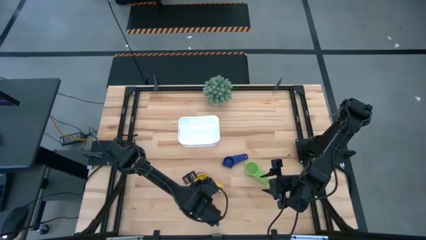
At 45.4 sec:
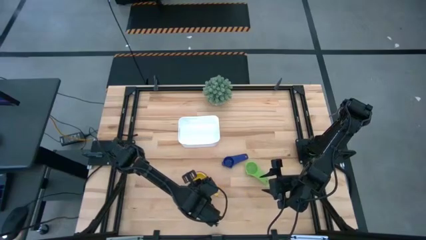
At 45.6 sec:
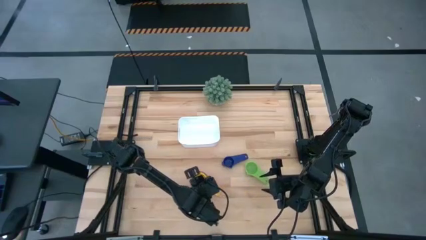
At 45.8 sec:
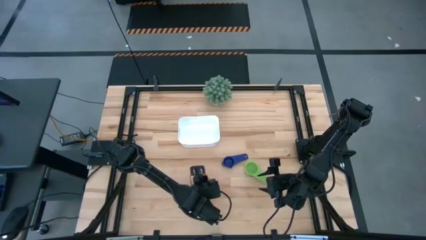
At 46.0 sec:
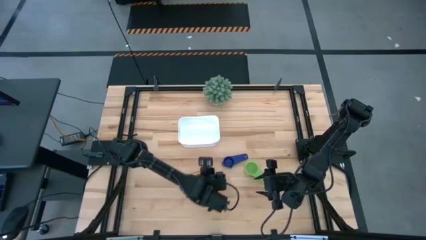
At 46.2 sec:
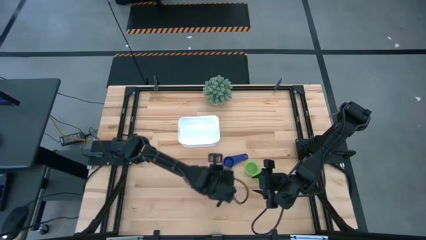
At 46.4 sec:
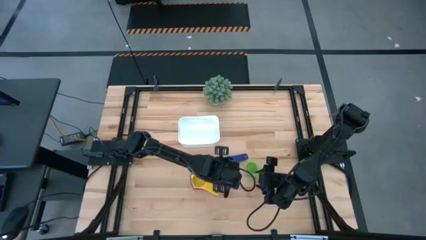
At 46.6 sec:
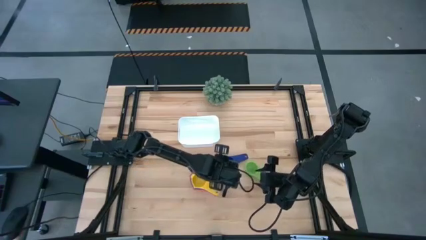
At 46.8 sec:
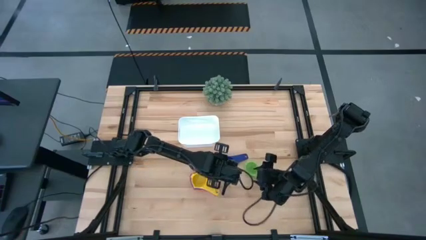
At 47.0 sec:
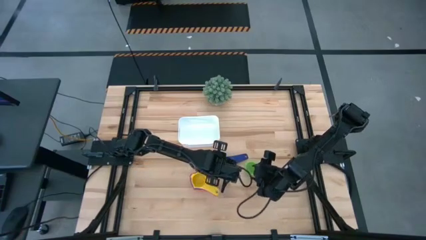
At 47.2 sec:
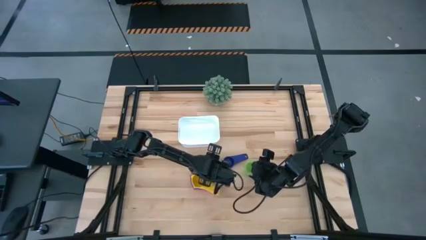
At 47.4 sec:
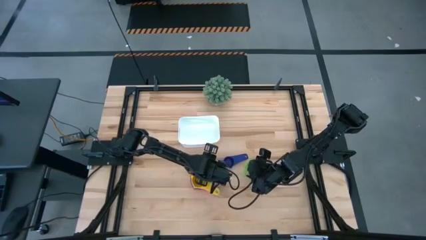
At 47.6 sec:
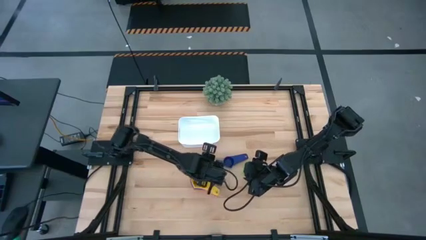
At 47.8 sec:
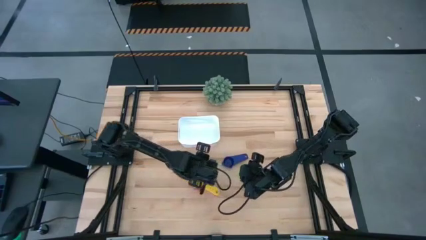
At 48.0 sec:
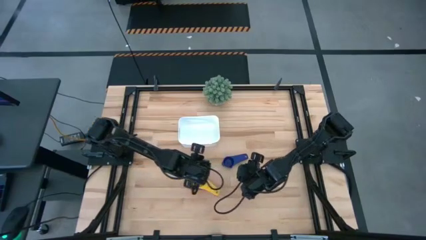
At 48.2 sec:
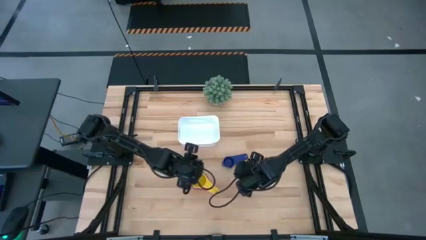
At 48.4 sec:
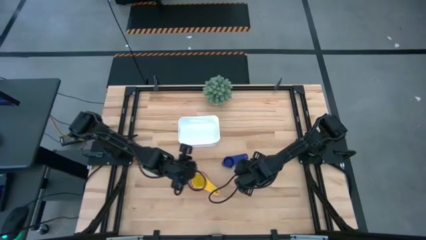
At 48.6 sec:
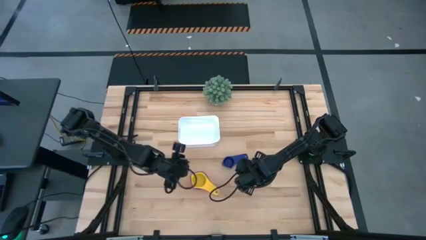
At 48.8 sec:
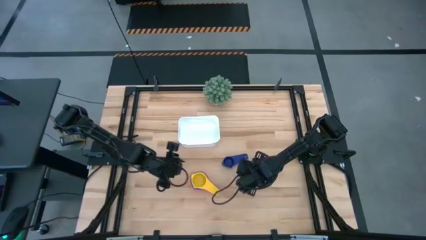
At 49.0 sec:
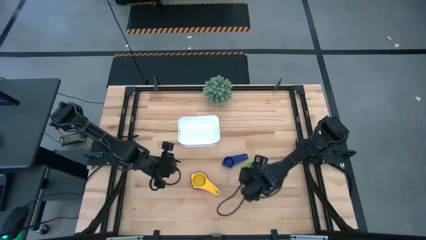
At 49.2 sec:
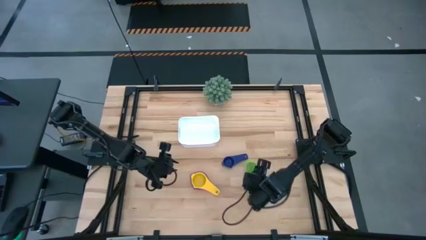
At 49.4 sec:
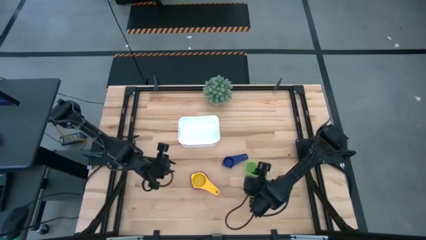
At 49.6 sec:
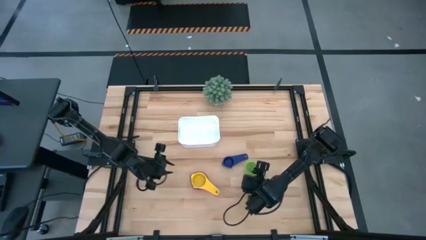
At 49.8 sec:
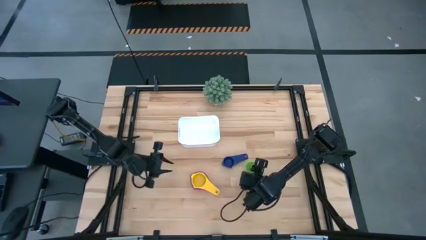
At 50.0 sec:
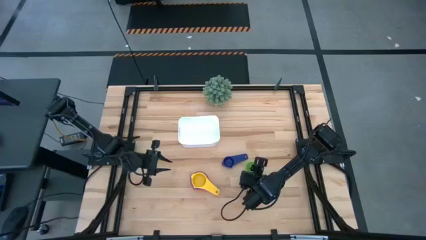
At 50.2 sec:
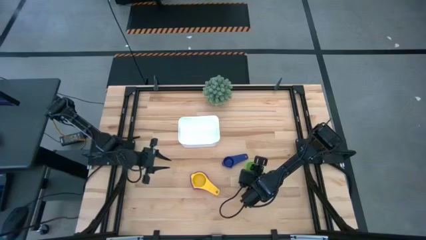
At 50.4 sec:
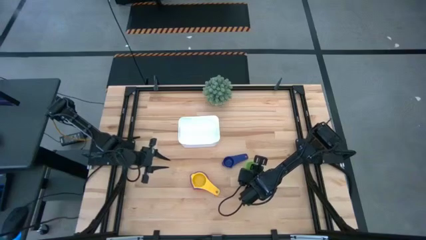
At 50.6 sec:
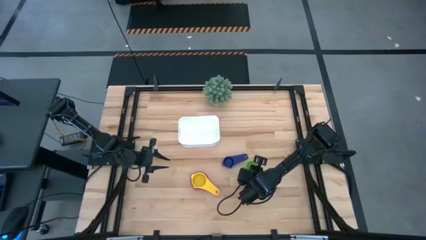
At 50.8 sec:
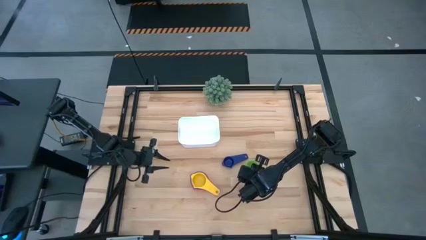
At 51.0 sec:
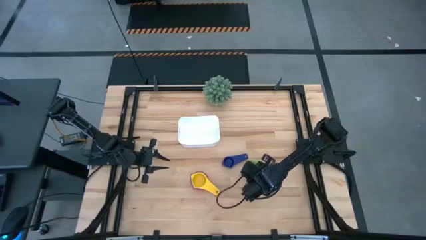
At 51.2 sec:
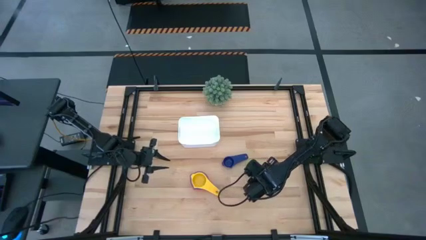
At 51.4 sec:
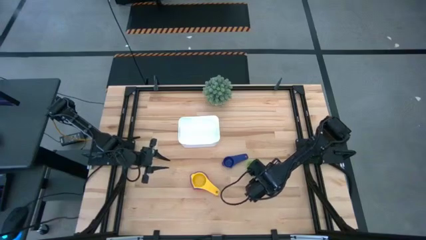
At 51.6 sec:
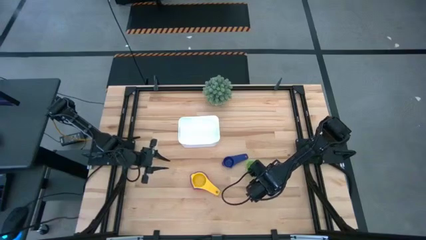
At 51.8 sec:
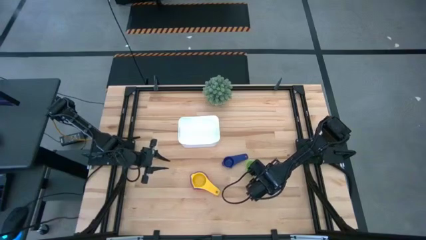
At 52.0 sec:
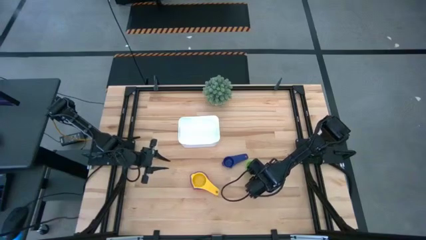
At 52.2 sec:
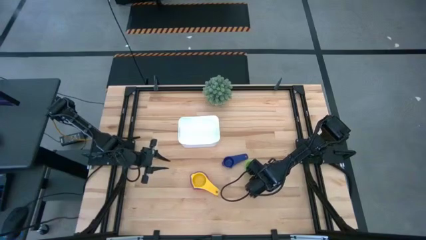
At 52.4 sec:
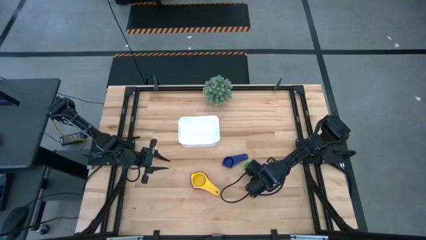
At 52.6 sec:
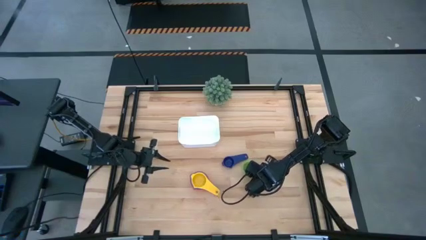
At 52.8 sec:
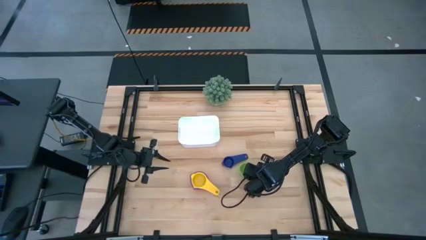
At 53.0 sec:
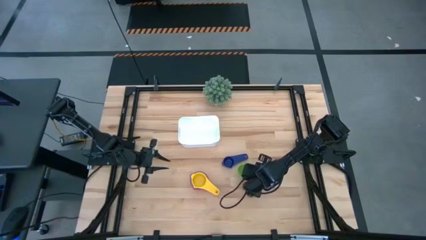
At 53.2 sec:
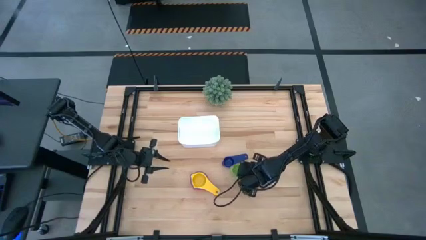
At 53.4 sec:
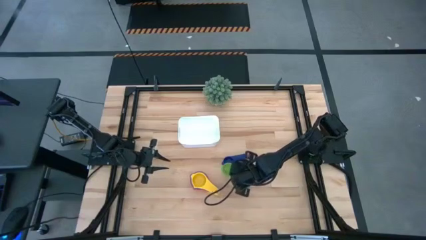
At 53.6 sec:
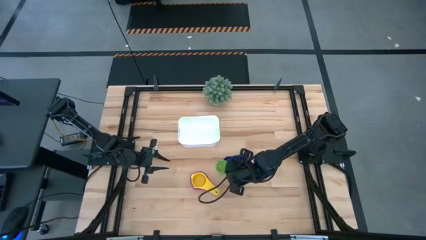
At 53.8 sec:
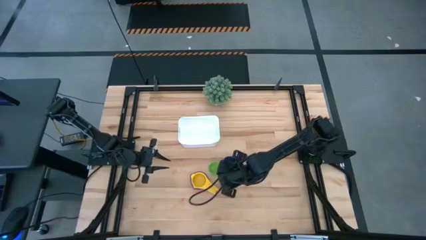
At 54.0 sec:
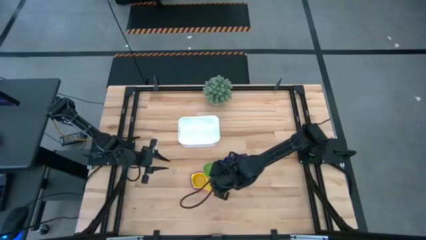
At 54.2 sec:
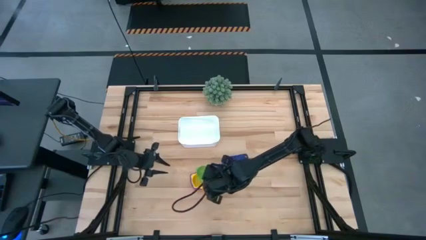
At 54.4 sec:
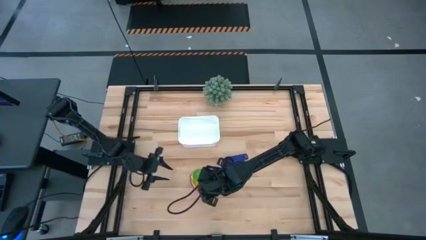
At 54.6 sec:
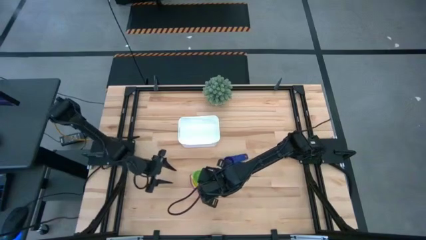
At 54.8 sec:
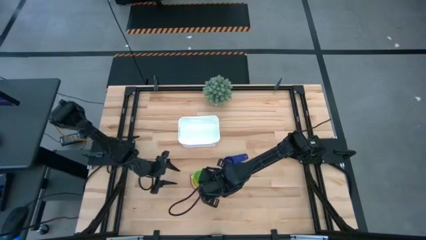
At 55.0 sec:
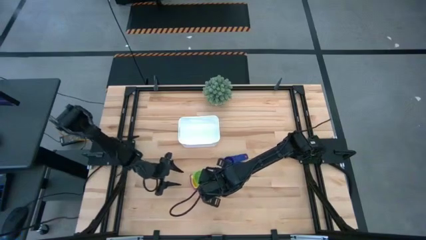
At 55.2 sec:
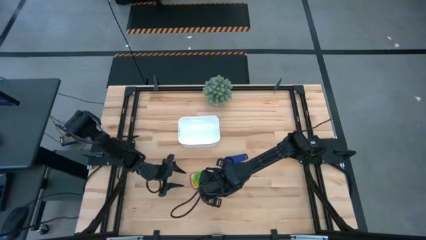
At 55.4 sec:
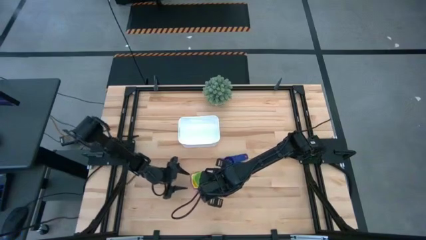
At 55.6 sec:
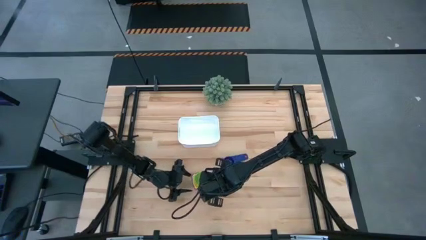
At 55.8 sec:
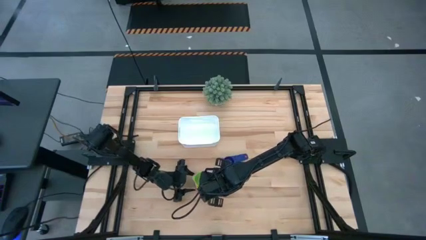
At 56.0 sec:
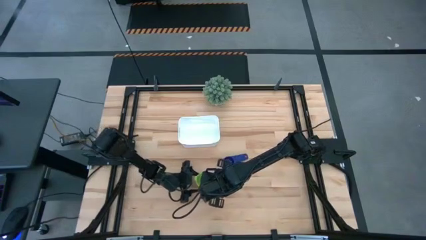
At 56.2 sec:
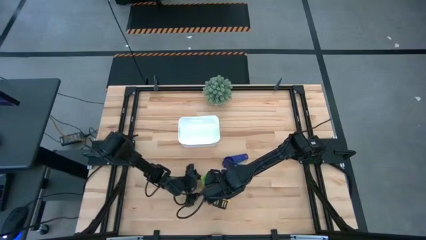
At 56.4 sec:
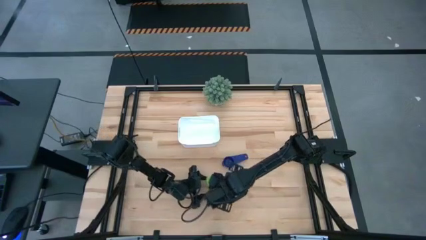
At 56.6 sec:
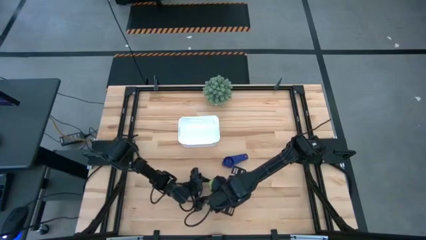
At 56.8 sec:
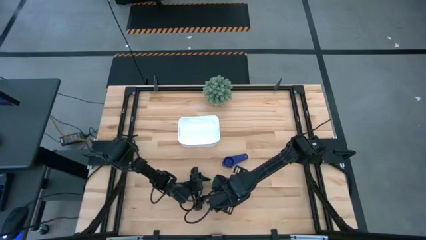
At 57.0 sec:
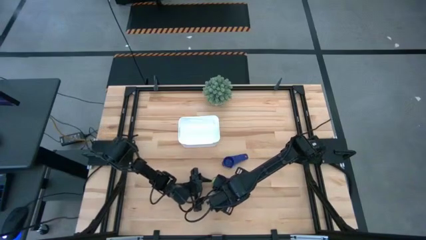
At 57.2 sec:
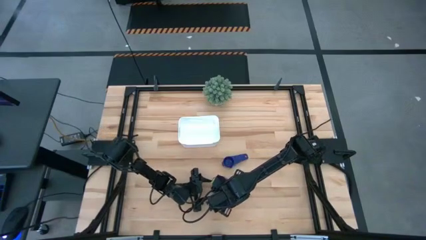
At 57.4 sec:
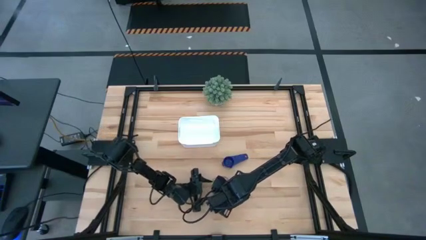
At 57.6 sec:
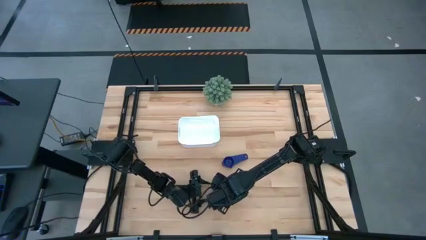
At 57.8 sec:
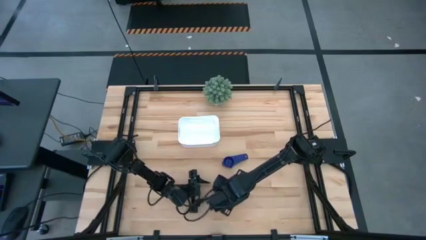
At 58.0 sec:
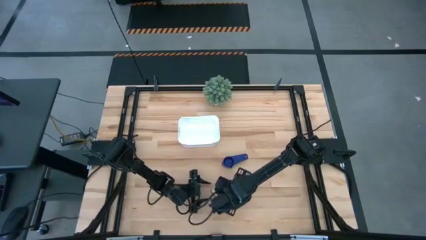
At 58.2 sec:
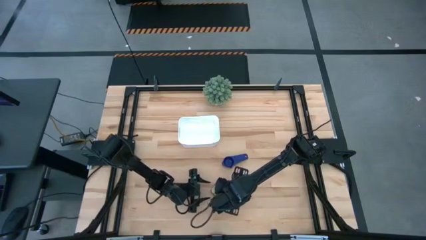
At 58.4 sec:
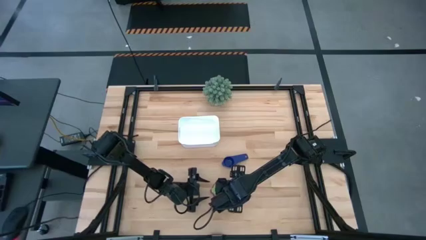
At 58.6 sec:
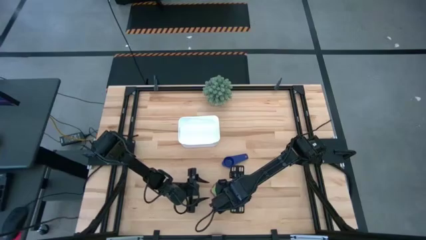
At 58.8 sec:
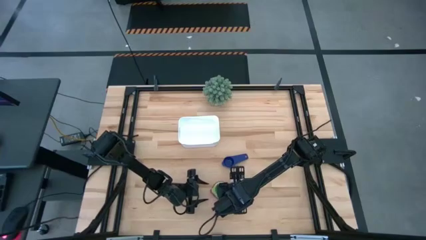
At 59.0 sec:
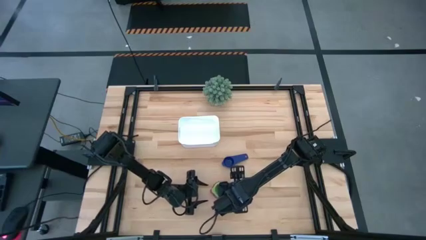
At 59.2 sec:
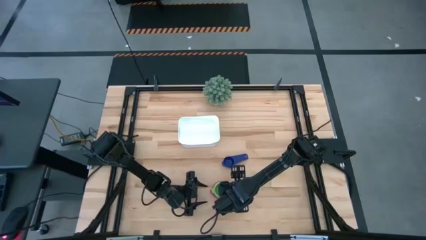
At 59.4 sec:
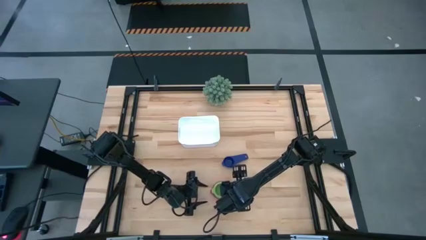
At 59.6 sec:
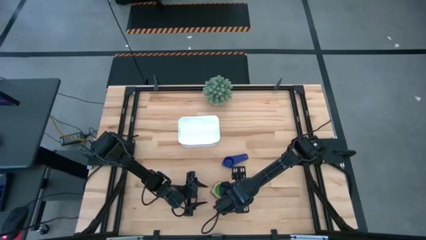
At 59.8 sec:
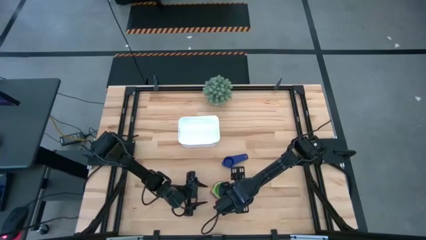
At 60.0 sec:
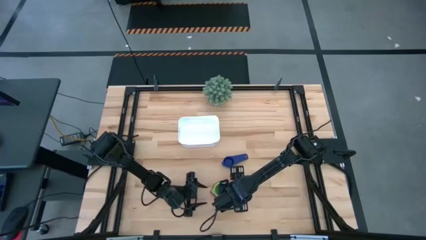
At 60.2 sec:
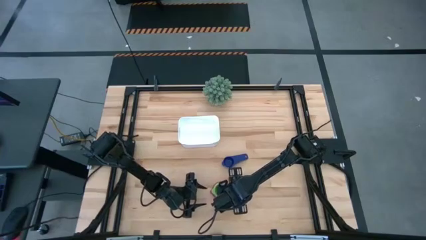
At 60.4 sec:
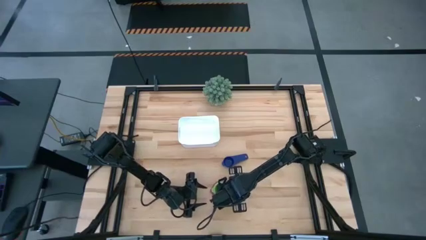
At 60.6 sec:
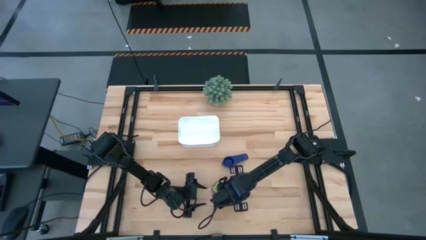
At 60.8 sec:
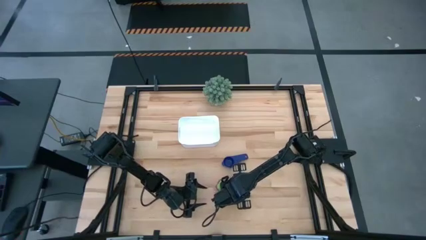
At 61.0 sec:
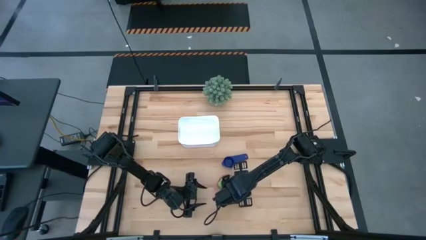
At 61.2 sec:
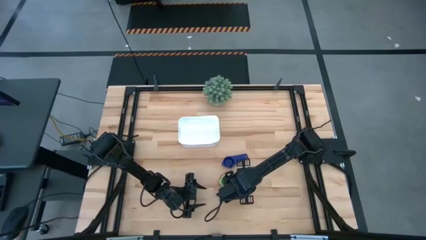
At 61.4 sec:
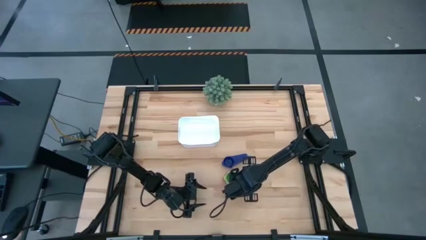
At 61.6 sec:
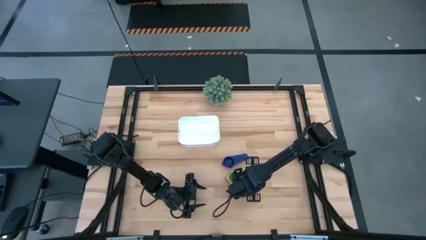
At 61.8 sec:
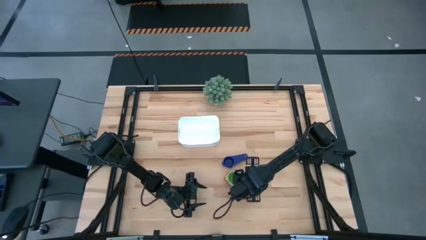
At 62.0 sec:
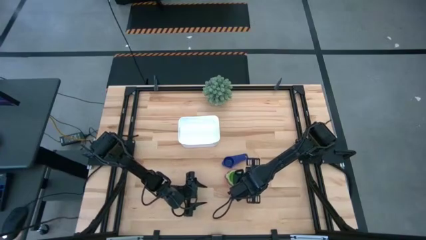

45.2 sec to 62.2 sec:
Task: Nest measuring cups in basket
Stack the green measuring cup on the top of the yellow measuring cup
